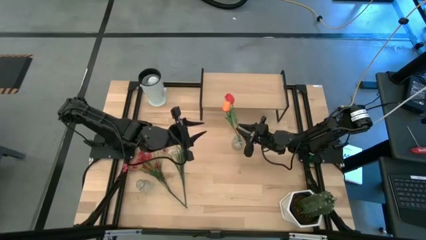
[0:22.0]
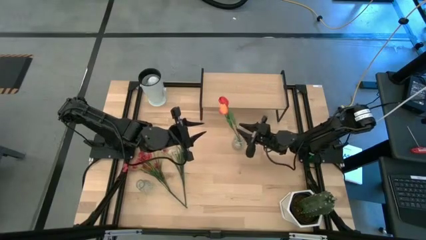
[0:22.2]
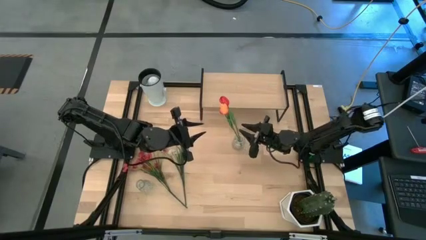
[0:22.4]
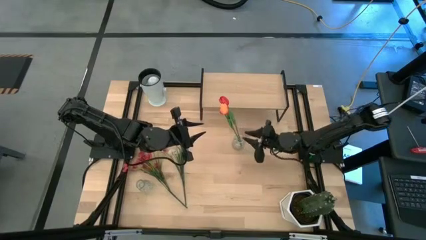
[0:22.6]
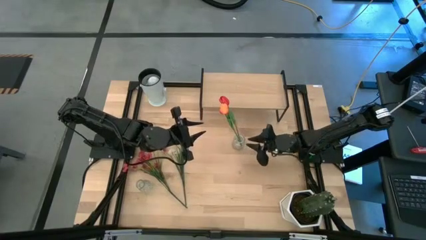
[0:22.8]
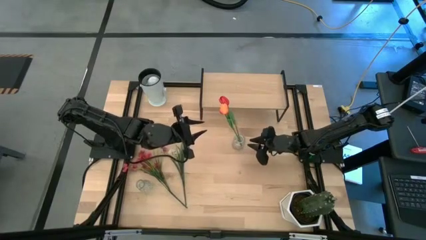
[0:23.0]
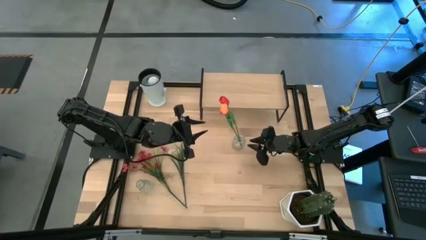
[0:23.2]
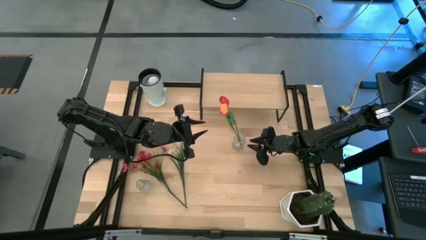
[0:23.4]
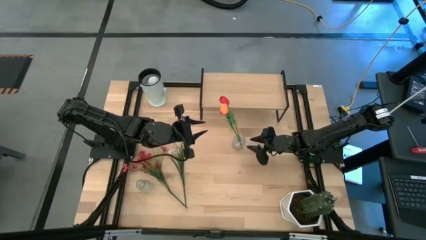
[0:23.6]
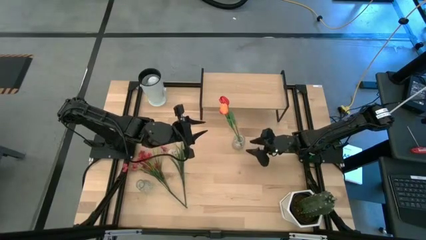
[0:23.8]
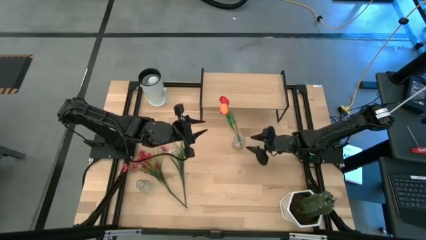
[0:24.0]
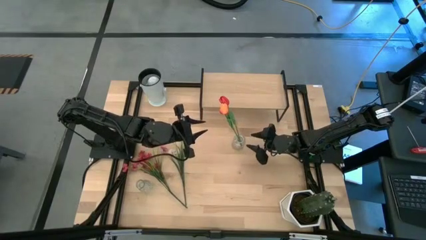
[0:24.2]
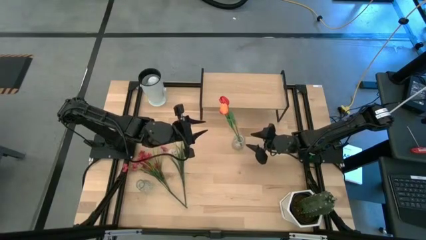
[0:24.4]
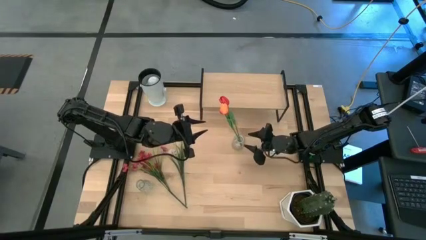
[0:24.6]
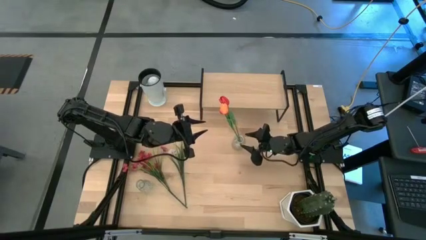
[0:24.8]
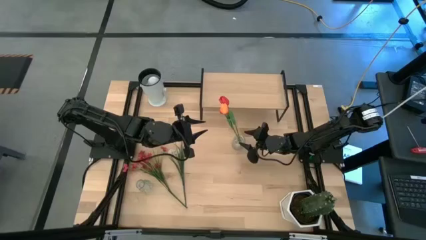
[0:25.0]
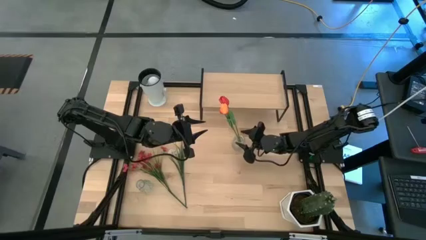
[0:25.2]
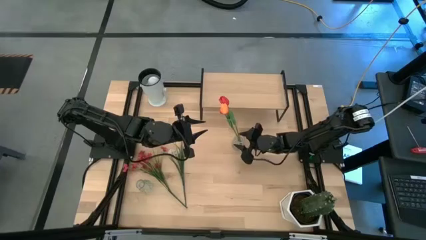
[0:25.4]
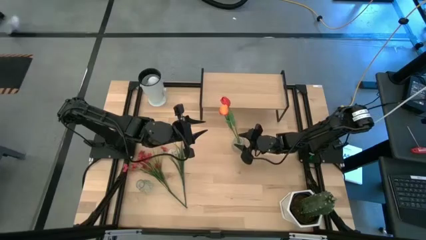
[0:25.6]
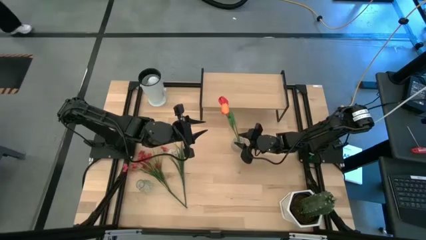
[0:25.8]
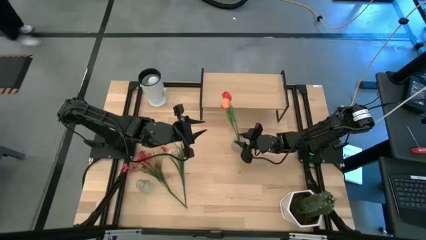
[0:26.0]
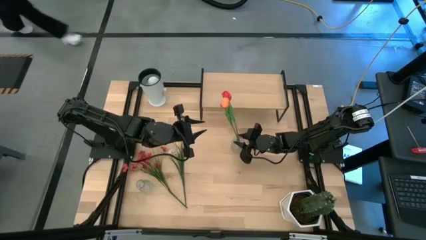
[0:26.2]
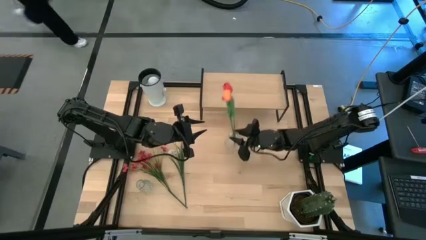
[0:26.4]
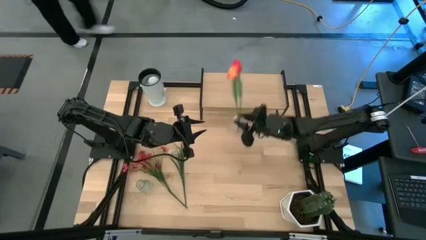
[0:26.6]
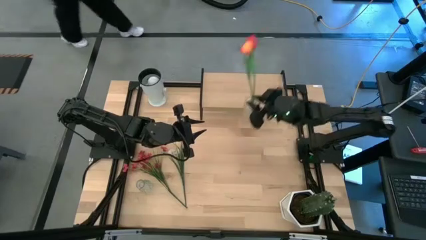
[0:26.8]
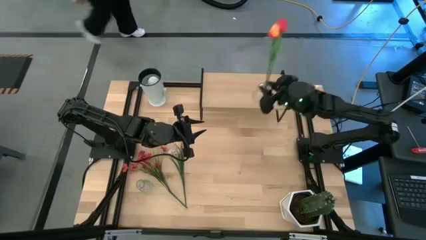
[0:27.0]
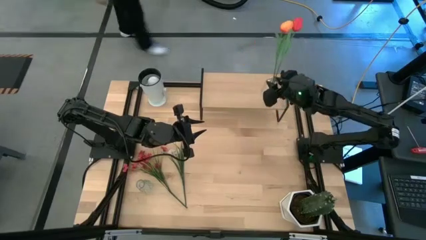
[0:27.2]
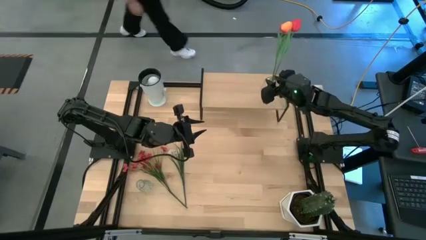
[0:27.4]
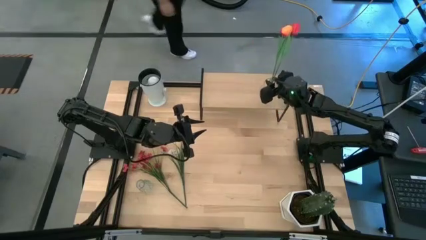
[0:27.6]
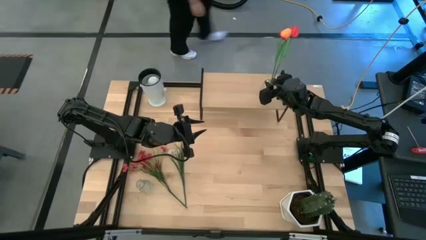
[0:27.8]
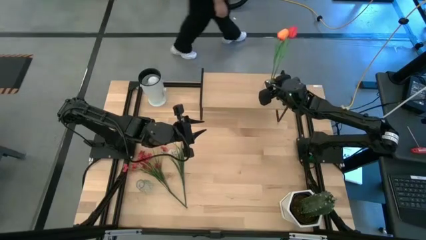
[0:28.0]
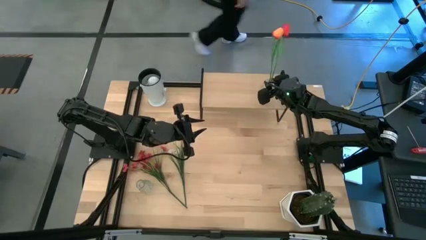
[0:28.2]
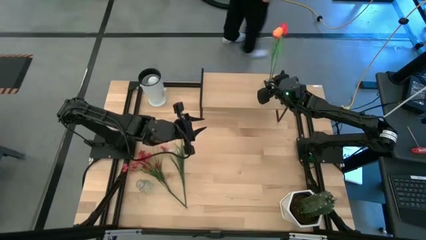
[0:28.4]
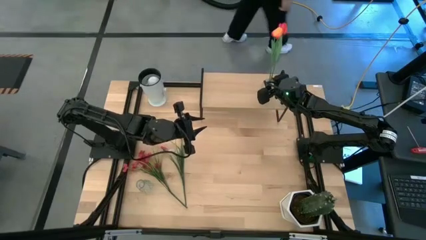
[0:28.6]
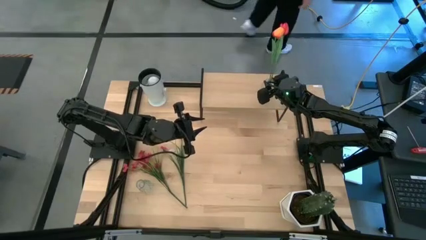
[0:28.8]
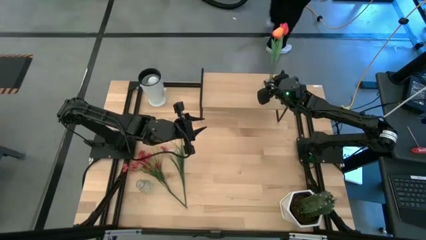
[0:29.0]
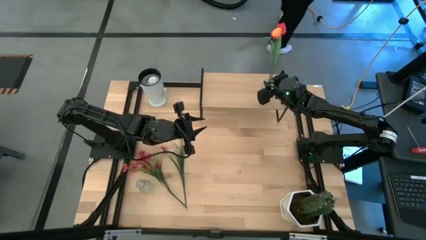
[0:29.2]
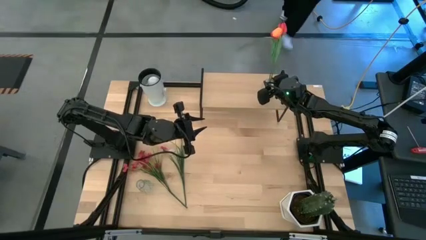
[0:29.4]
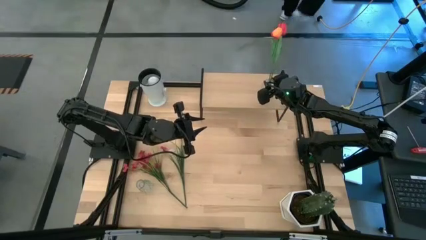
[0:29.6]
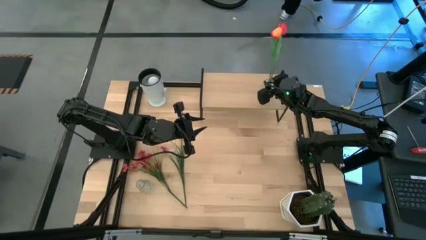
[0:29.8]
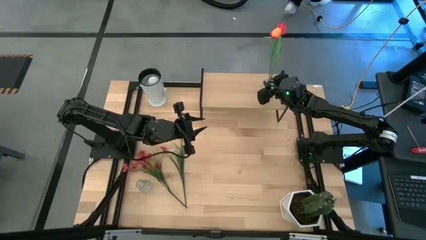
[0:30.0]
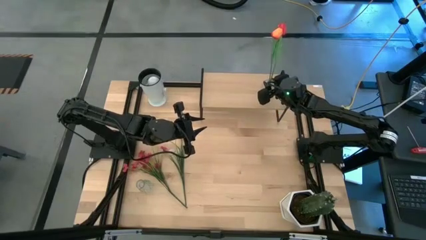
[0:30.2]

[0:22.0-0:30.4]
Task: Pick and place flowers into a vace then onto a shelf
Put the flower vase on the shelf

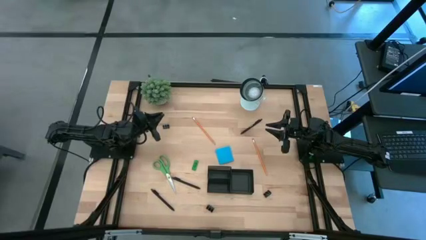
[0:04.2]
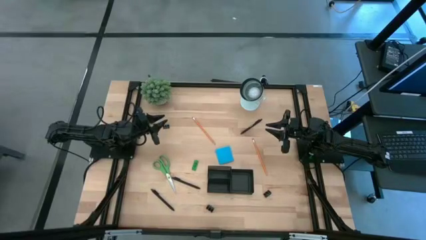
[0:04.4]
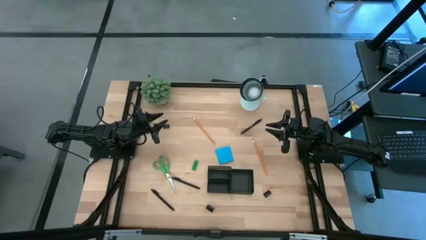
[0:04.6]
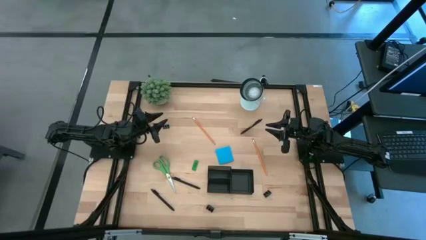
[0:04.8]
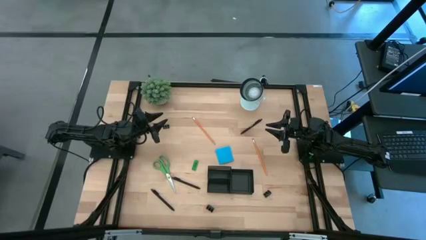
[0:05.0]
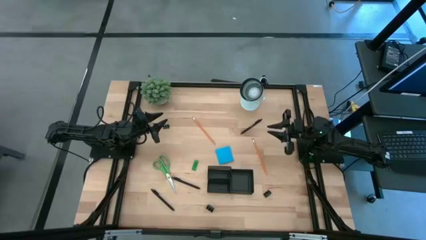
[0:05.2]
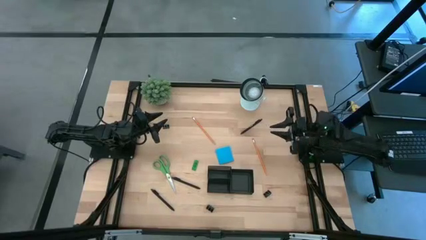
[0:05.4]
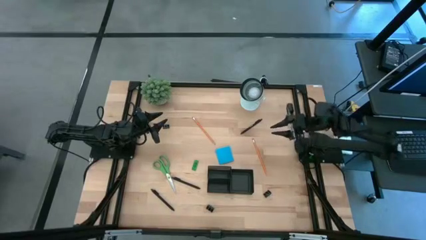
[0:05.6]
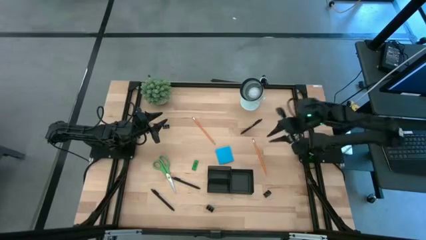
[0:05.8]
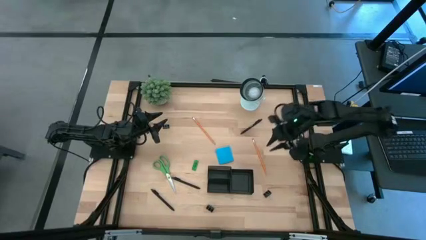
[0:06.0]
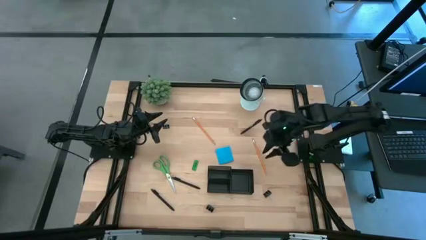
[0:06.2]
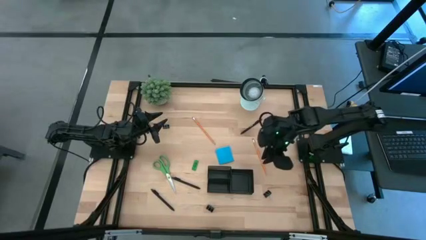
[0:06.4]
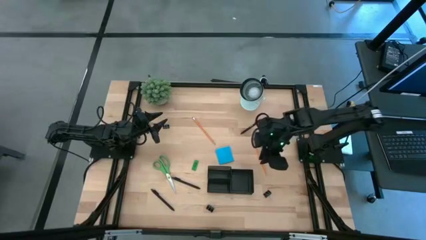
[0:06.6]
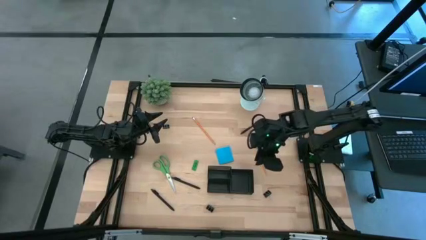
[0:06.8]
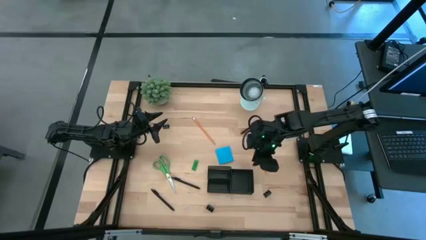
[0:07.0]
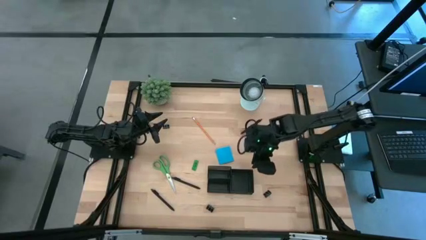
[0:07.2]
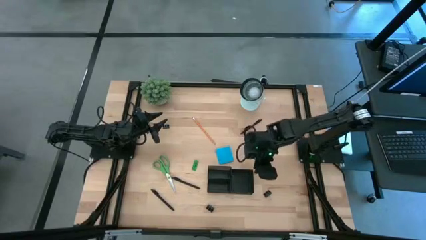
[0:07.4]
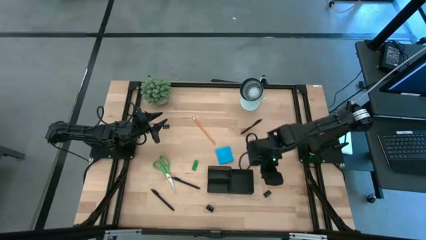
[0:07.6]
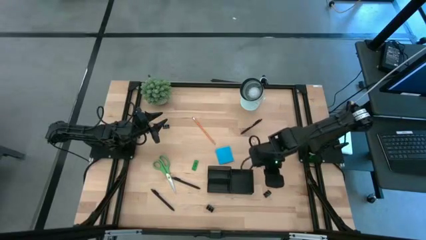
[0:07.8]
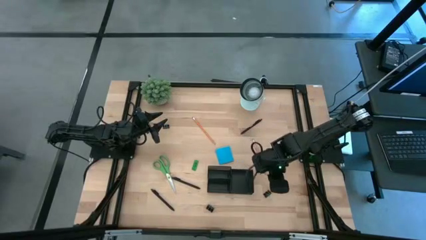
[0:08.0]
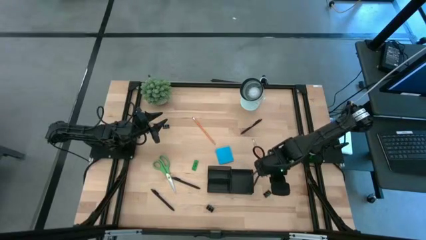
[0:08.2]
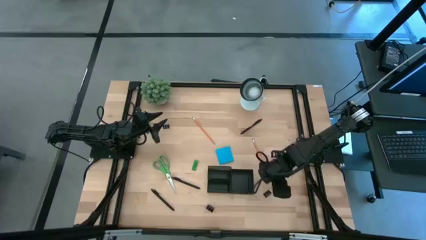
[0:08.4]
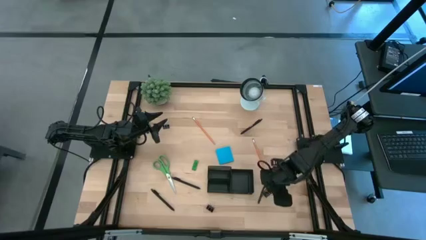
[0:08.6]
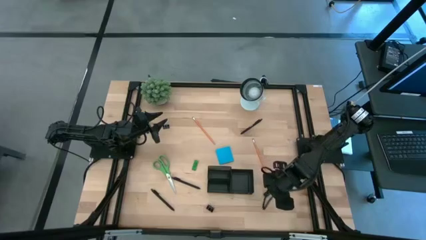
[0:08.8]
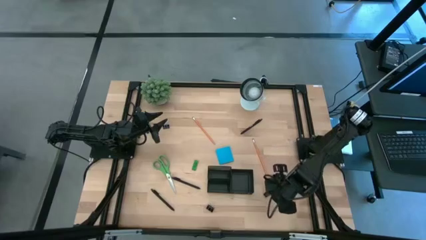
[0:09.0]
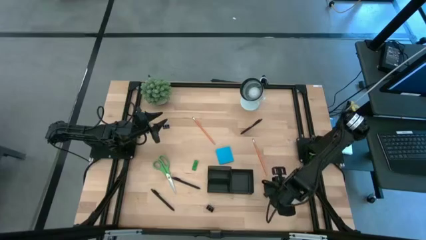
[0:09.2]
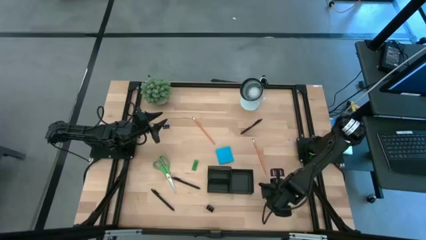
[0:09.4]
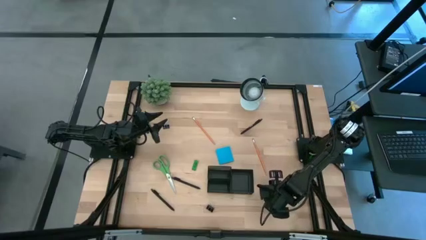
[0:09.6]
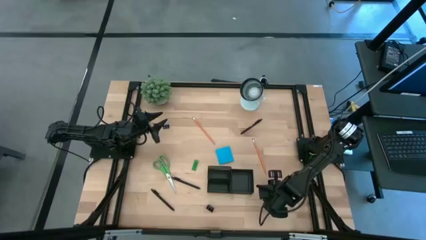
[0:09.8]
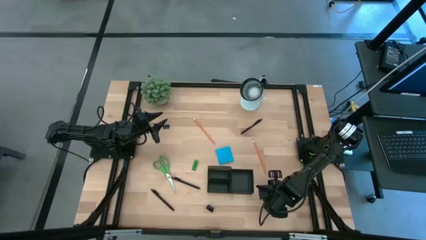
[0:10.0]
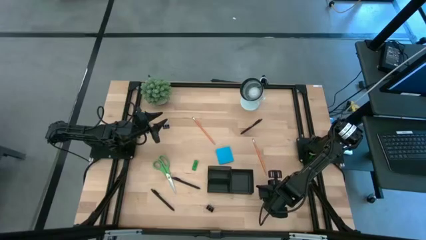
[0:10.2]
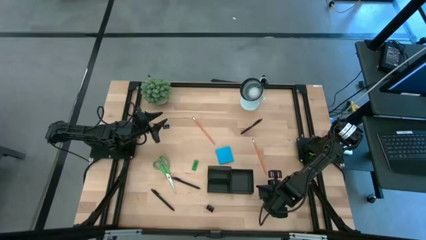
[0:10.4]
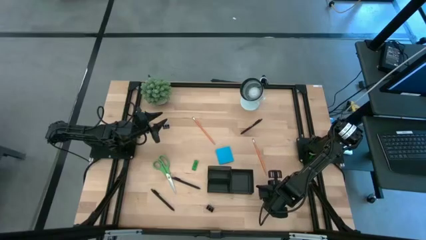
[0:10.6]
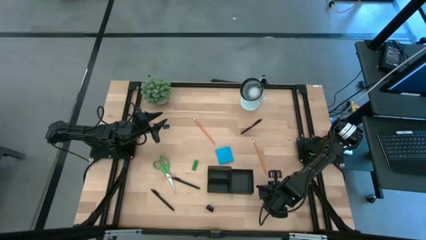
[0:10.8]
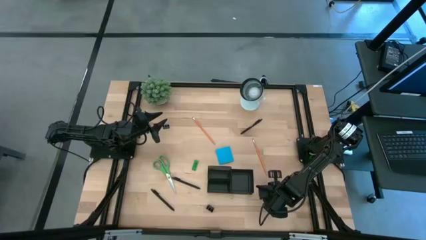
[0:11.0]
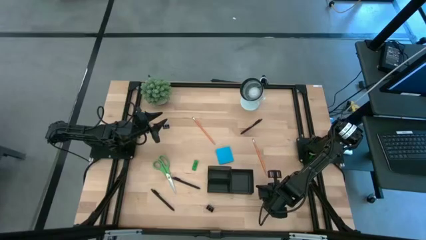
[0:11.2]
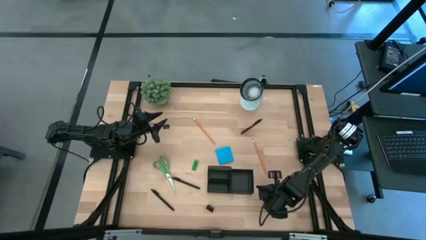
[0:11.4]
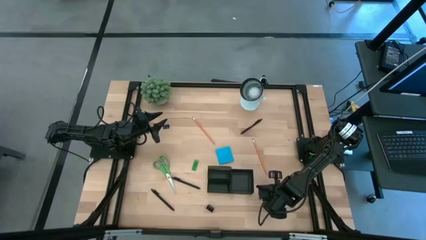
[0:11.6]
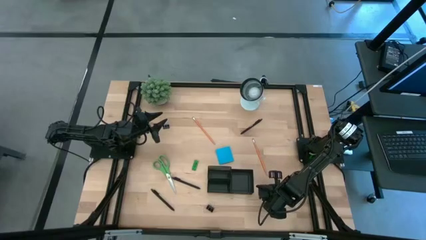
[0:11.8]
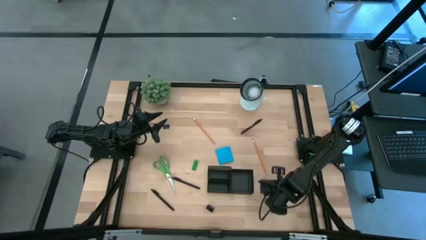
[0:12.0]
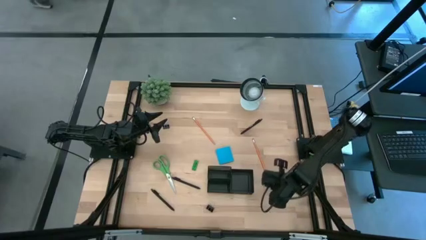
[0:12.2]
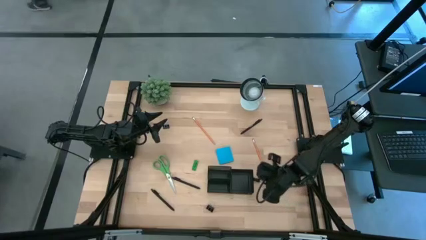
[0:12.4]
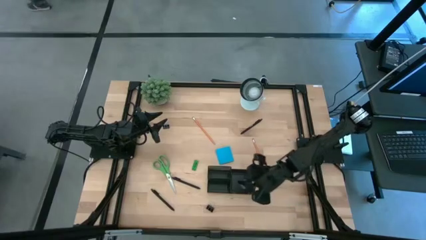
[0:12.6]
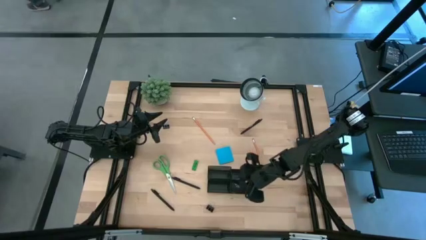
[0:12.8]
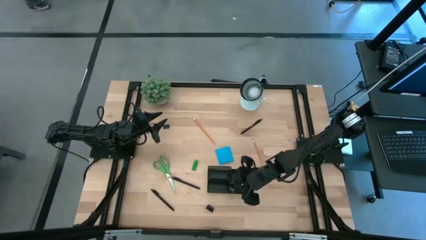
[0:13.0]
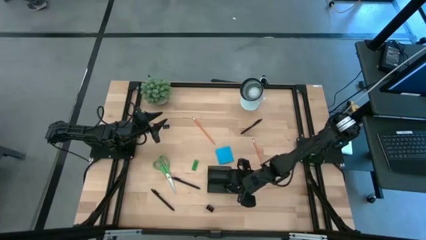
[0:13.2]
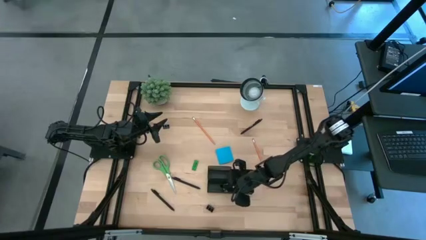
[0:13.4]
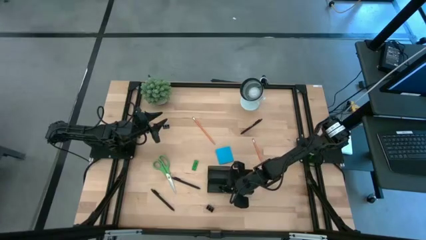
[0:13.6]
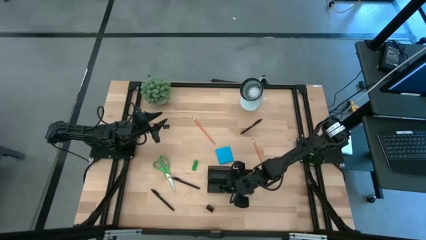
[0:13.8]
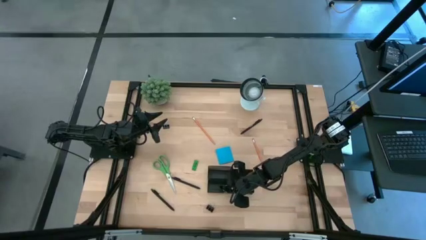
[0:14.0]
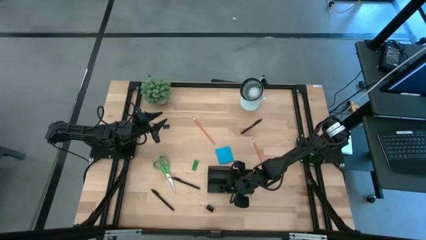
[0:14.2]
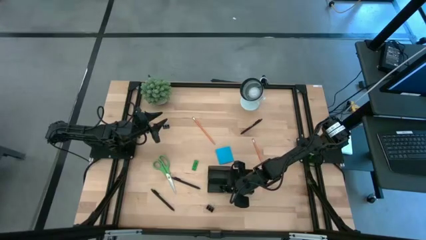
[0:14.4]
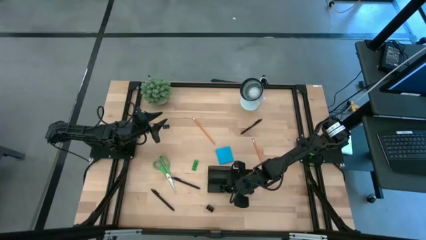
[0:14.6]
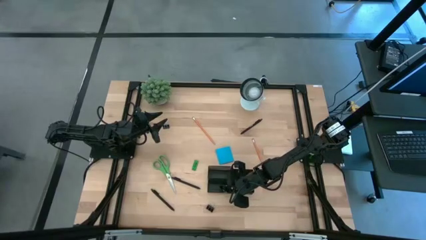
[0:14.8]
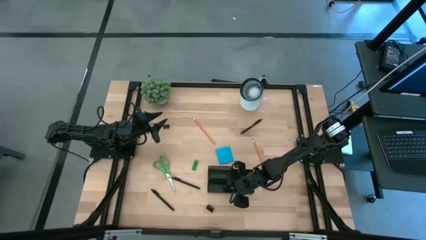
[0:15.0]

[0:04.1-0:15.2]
Task: Pick and place office supplies into organizer
Put the bottom right binder clip into the bottom left slot of the desk organizer
